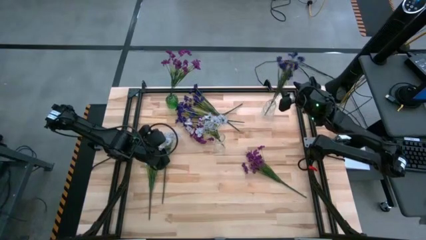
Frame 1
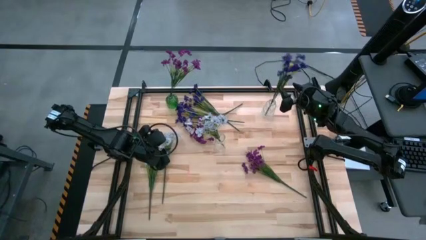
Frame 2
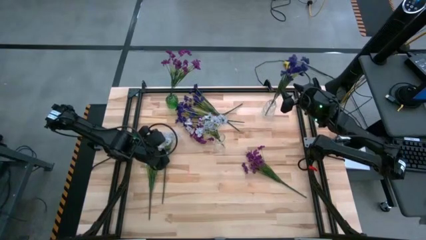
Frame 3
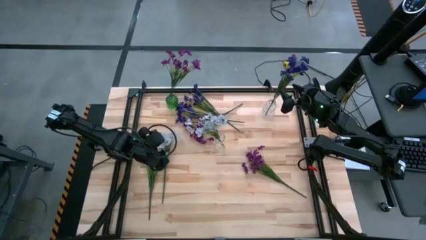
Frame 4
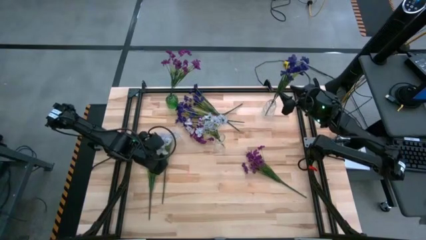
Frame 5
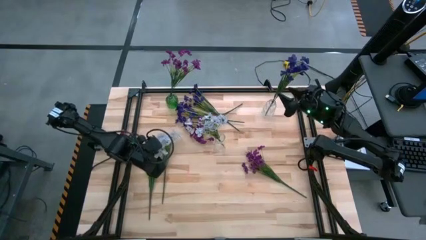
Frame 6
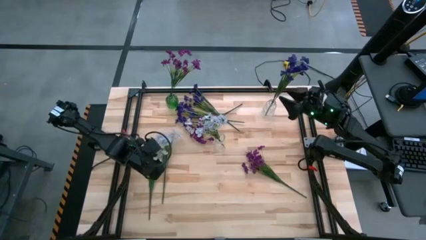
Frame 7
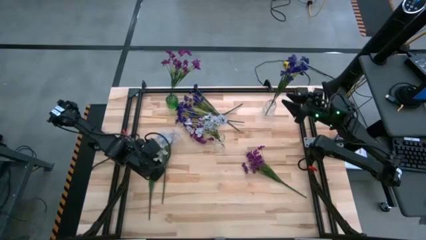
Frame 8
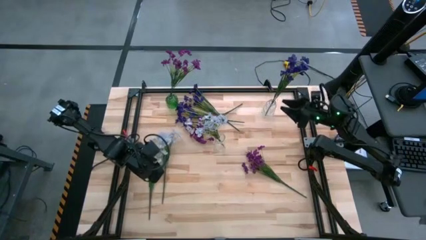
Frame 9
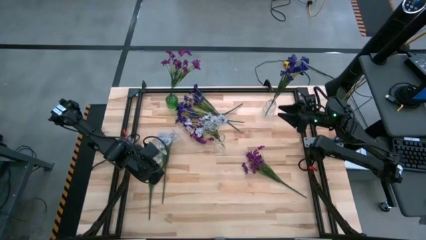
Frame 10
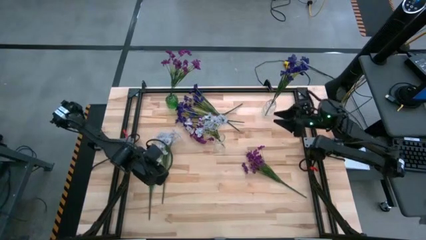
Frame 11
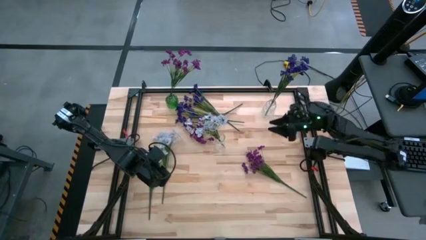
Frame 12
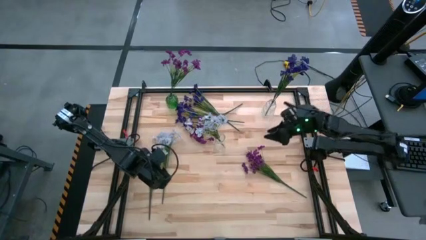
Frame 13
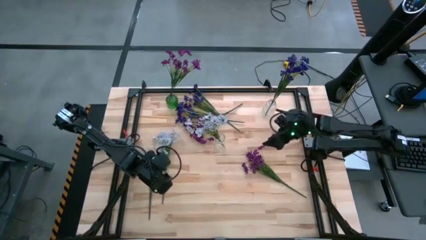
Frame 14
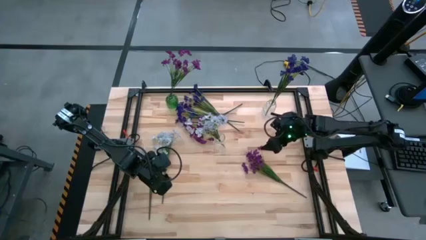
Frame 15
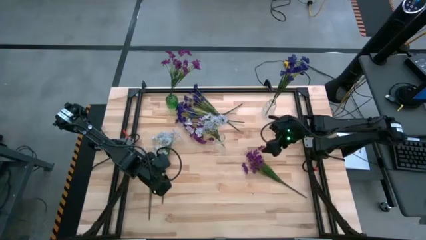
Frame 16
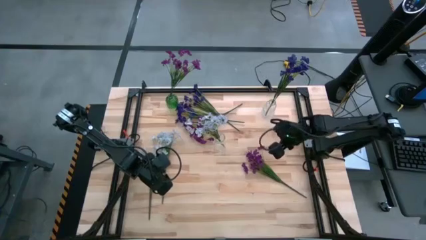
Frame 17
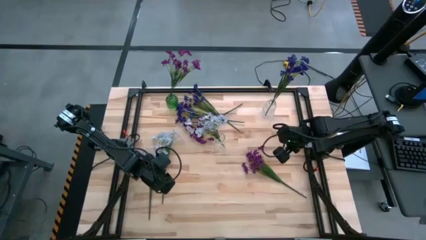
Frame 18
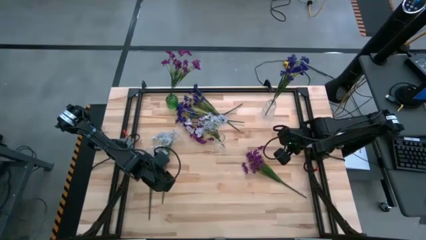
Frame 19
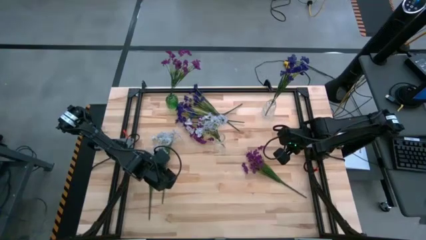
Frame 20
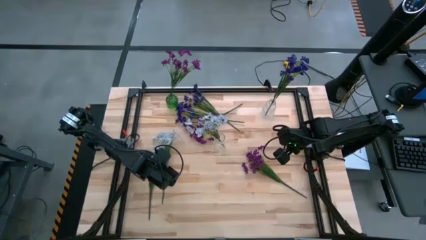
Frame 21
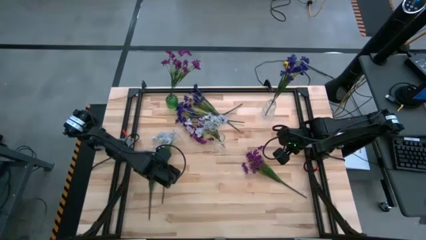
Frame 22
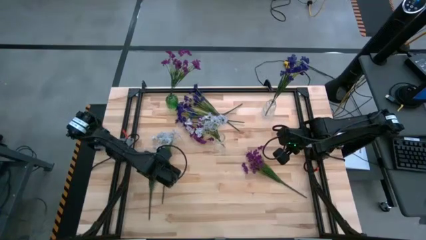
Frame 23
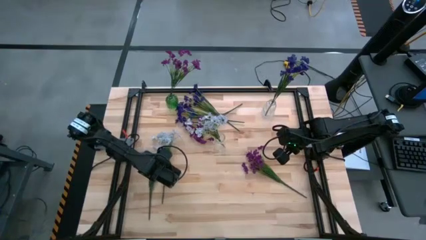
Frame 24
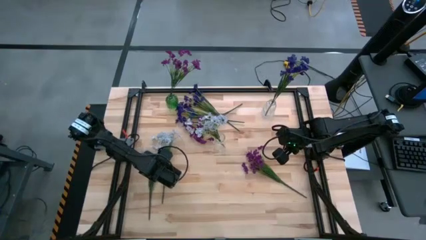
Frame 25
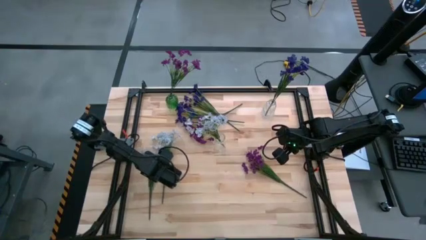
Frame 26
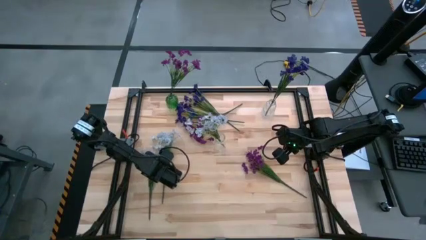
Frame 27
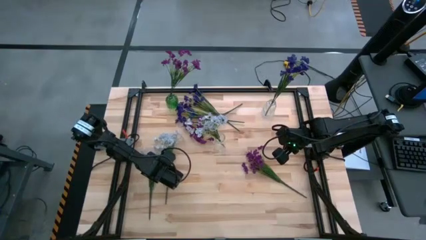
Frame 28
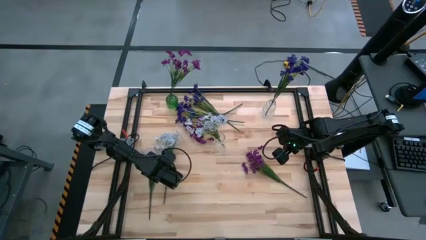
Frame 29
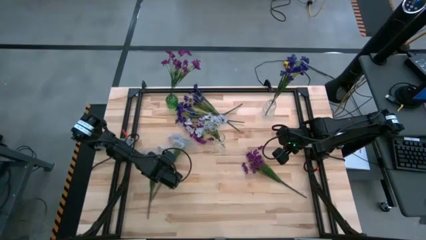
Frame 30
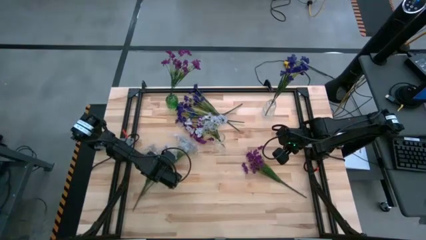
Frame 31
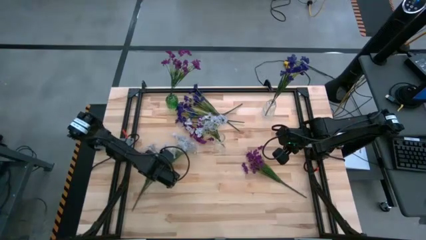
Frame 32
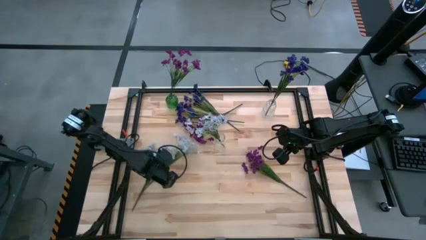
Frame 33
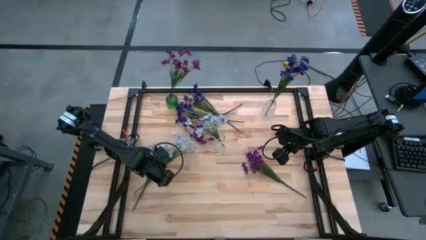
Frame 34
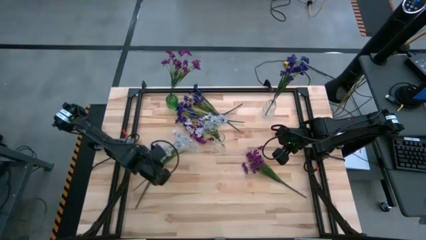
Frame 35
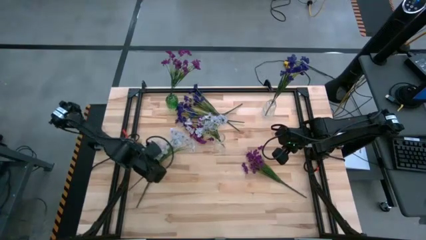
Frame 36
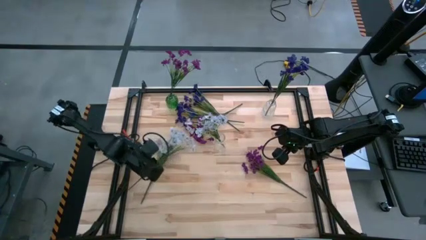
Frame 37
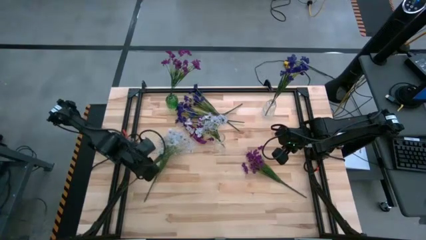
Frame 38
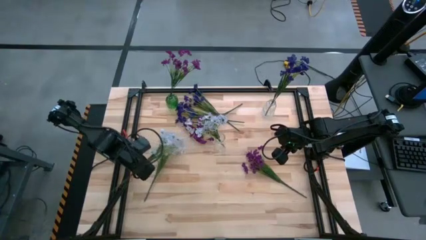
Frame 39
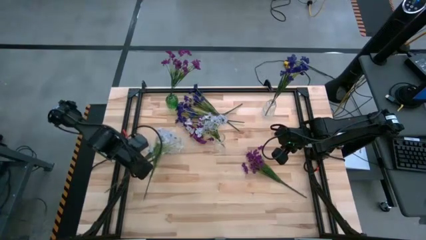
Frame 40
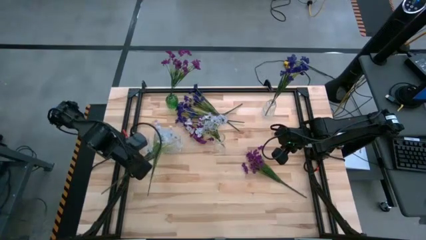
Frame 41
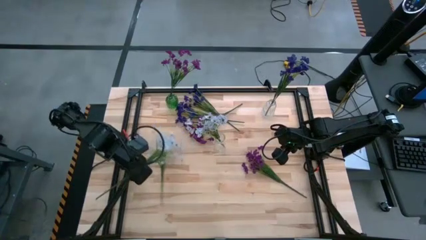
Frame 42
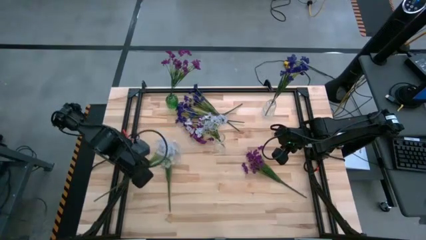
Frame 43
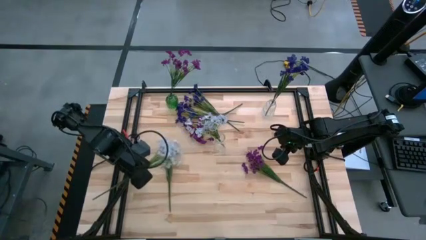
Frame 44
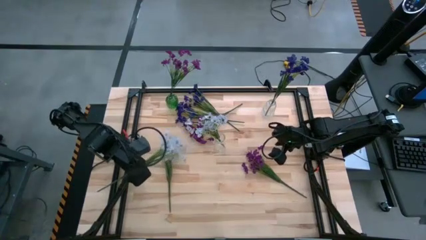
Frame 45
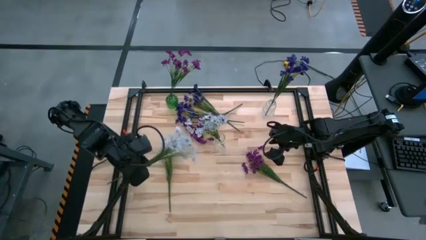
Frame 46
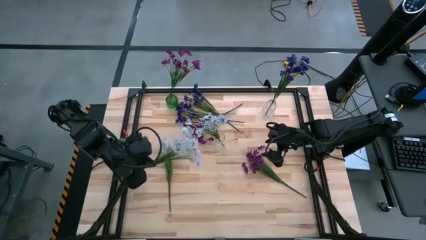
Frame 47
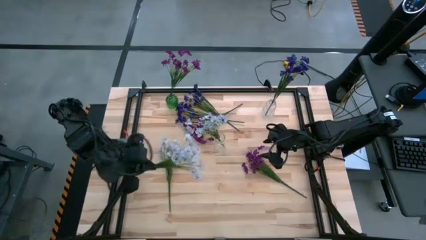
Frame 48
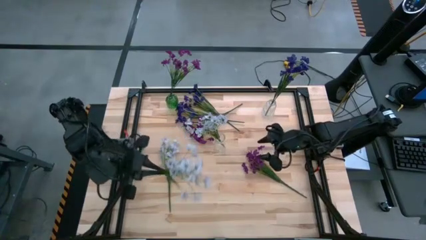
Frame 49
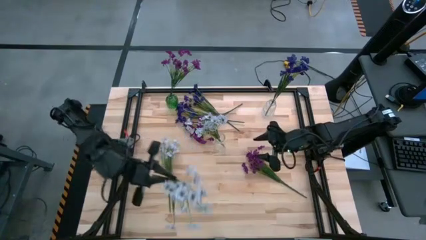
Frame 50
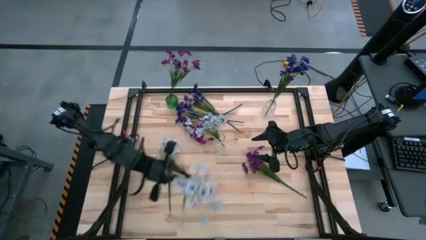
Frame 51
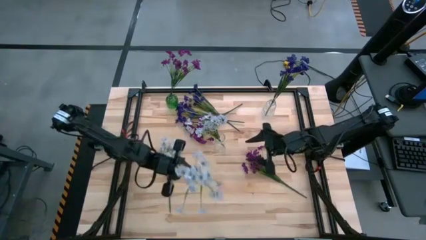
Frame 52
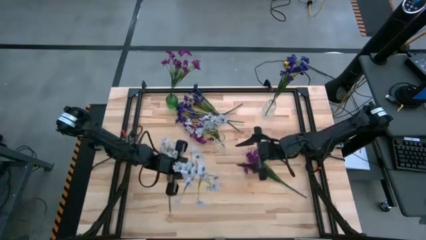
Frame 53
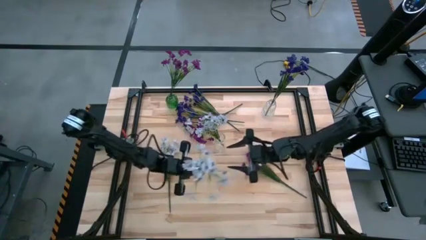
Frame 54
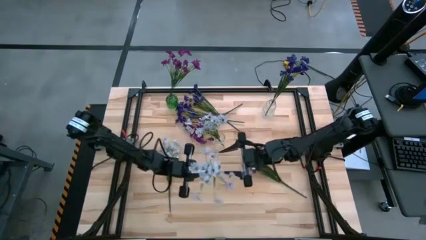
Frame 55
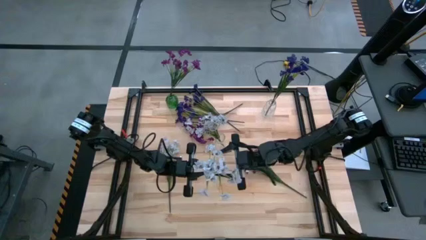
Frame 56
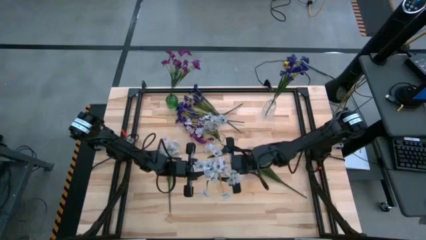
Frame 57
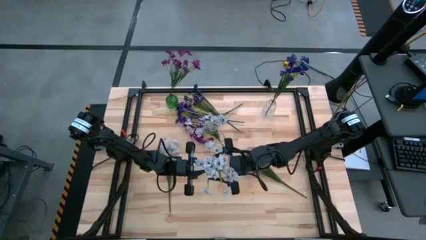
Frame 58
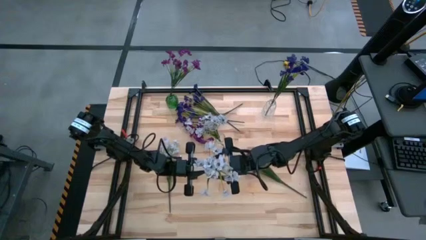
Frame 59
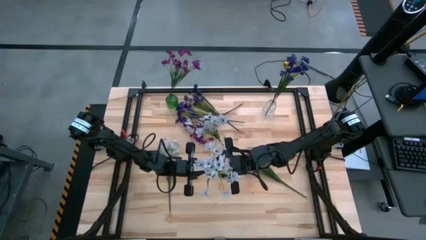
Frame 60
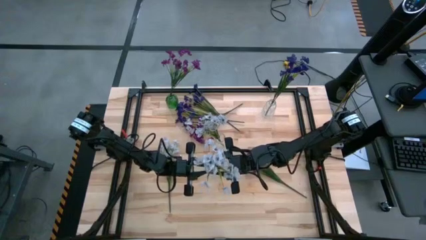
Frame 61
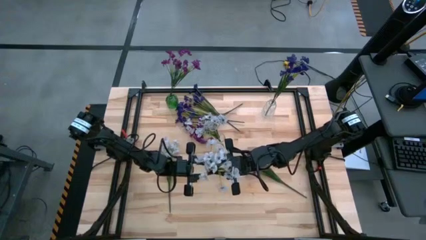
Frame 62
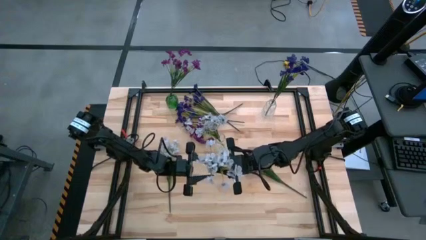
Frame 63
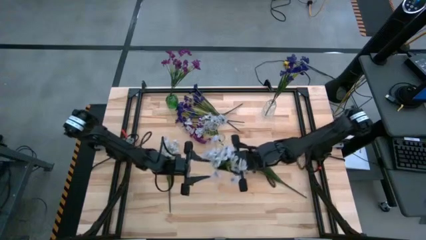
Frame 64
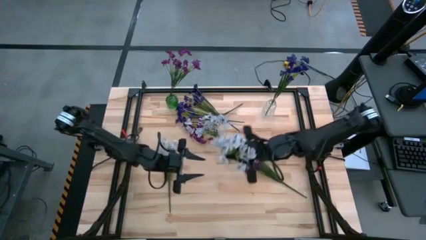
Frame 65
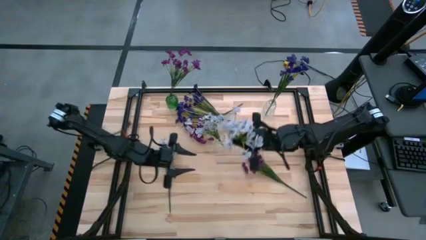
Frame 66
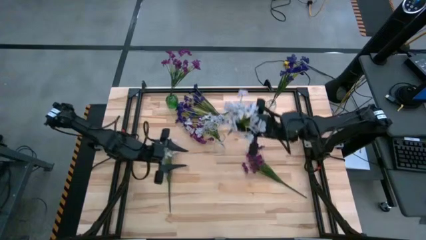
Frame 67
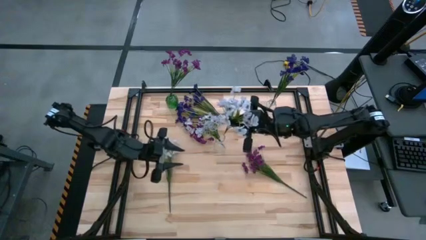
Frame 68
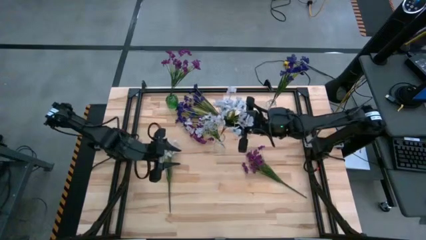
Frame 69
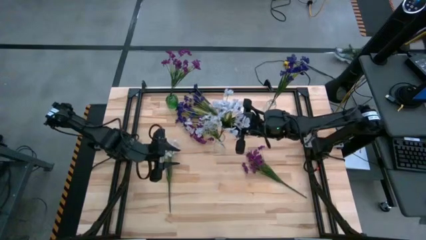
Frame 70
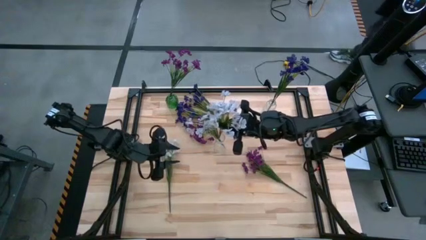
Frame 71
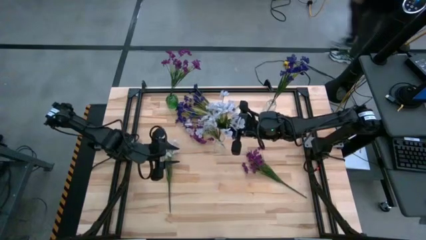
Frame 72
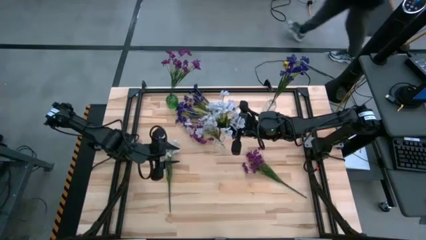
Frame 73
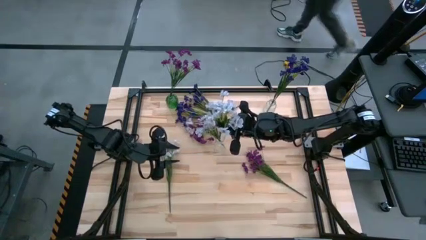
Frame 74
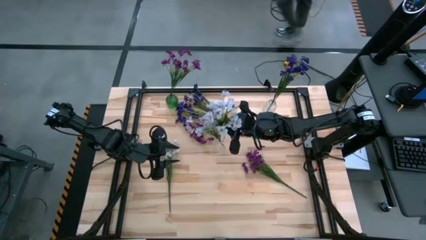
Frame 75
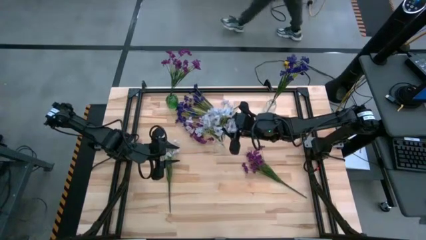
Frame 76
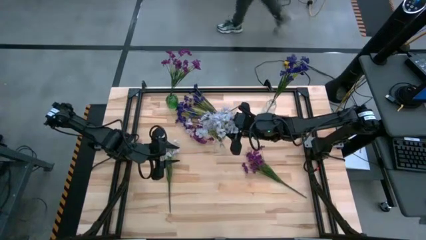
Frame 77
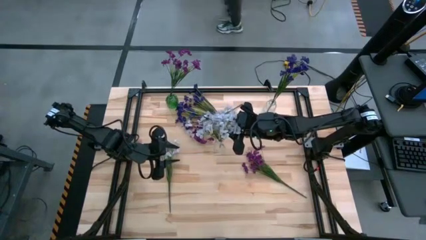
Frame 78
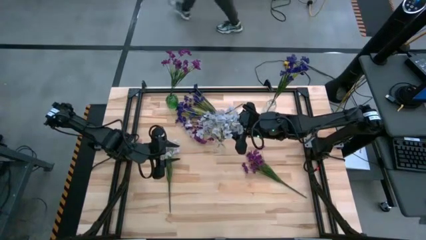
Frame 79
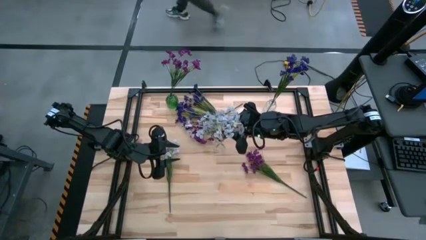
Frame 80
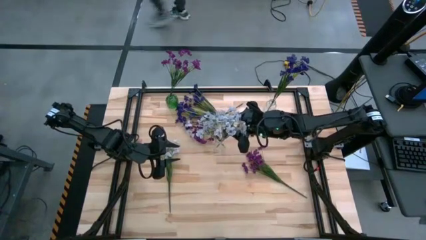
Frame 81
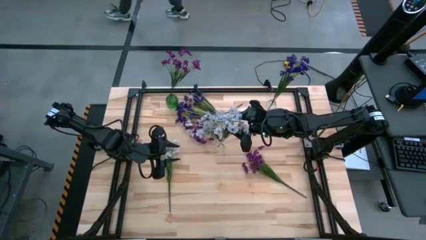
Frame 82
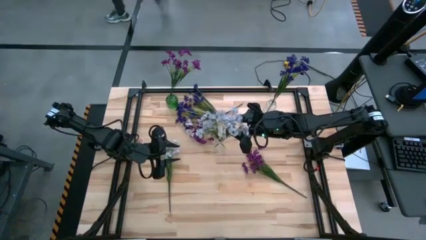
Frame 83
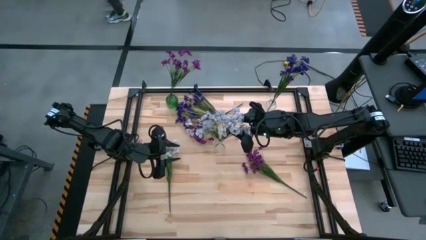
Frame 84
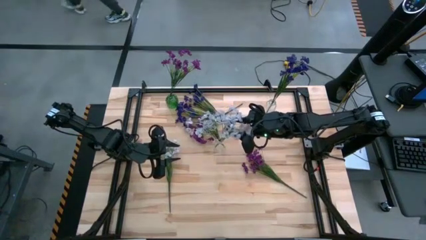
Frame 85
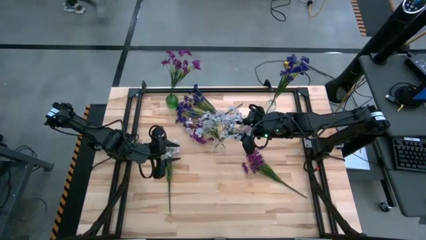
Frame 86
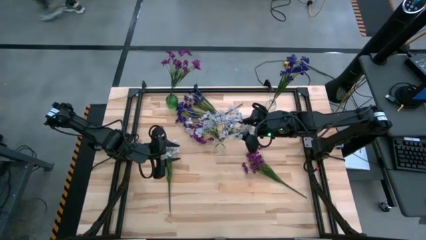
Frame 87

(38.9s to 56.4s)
Task: Sort flowers into vase by color
Put the top white flowers into the bottom transparent flower vase
